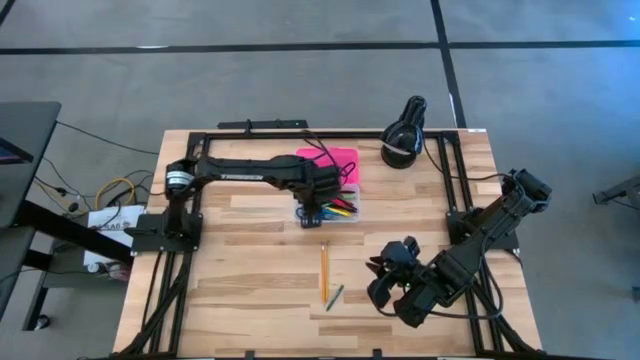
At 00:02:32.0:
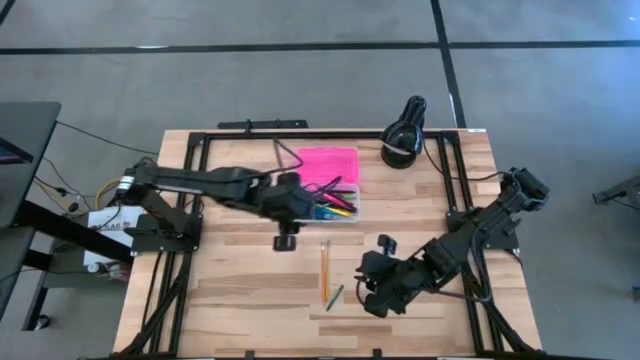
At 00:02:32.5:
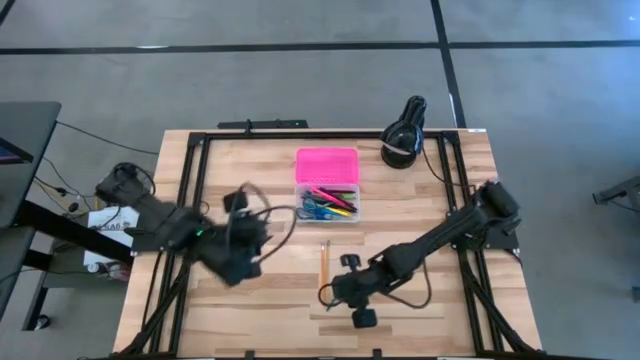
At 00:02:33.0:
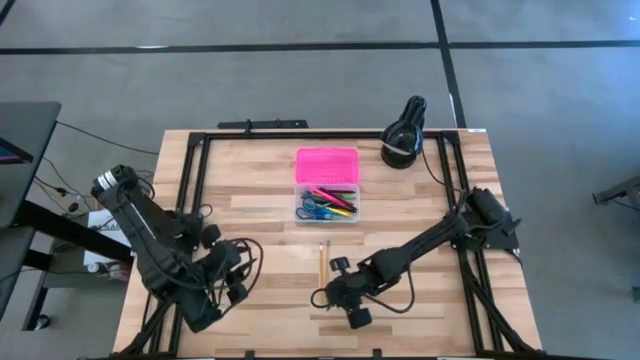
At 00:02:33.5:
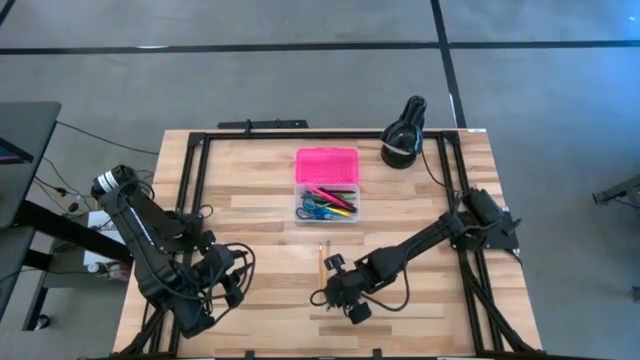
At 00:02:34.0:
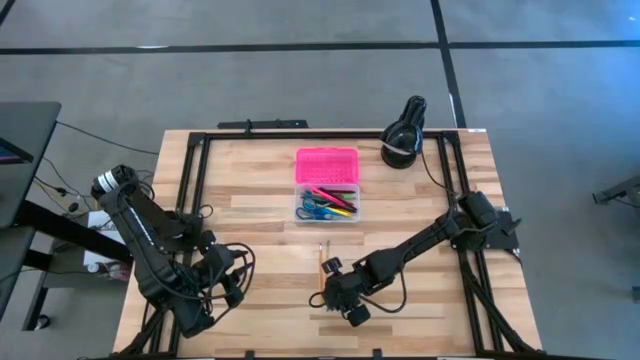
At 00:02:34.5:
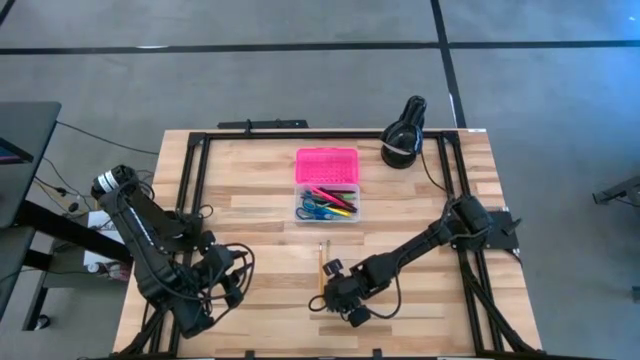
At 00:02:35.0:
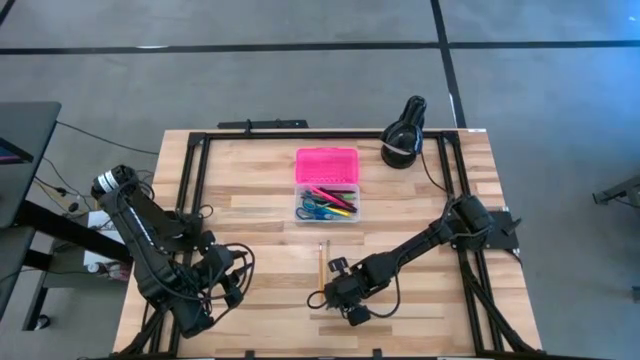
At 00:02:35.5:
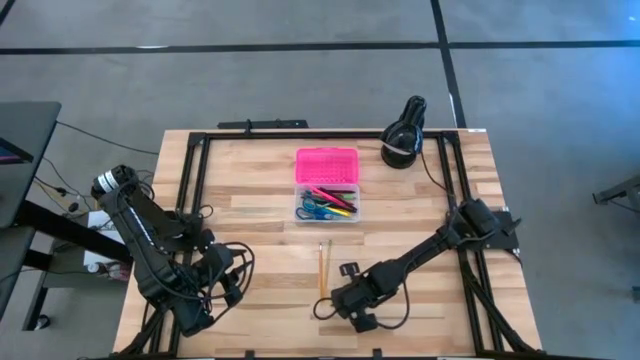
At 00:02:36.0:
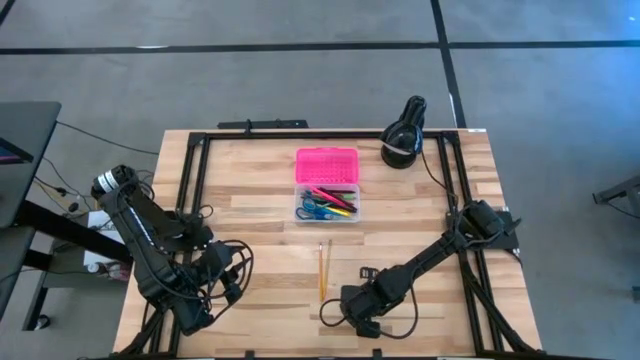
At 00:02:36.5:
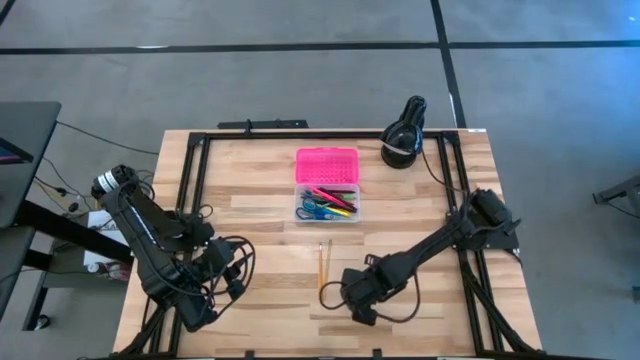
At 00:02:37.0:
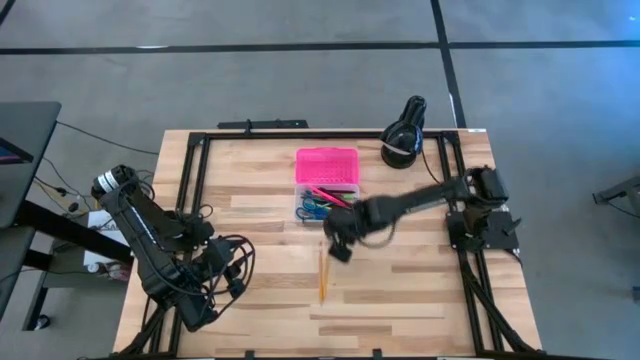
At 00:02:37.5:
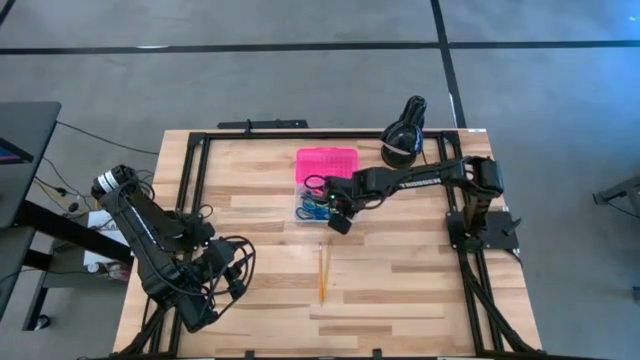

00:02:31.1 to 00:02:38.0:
Task: Pick & place school supplies into a supply box
Put the green crayon into the pink supply box

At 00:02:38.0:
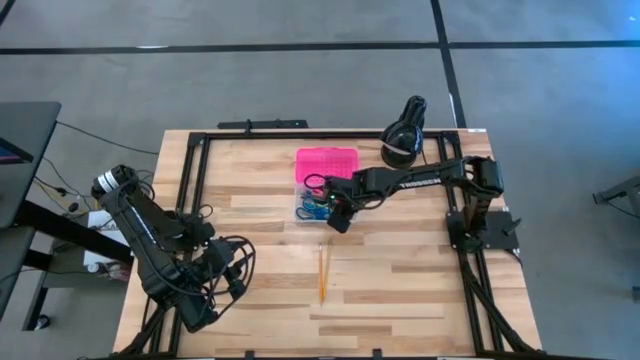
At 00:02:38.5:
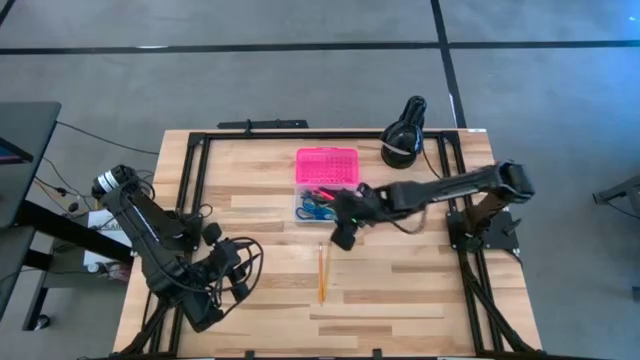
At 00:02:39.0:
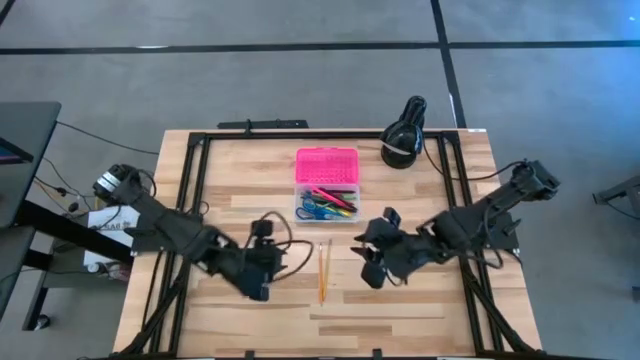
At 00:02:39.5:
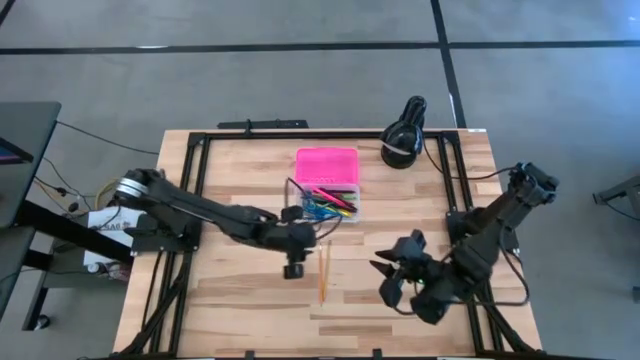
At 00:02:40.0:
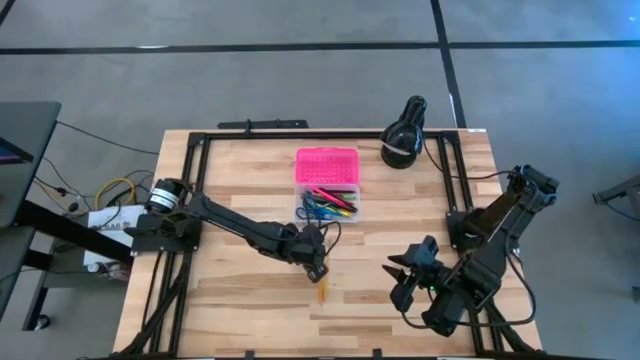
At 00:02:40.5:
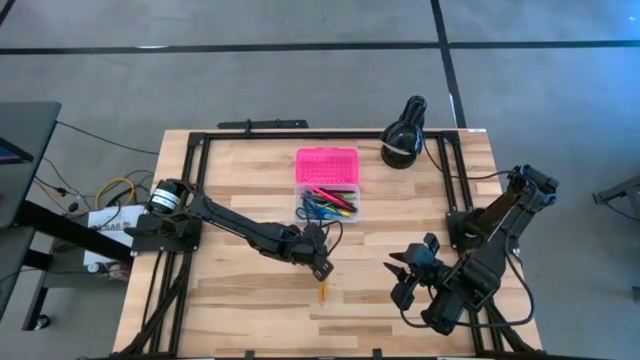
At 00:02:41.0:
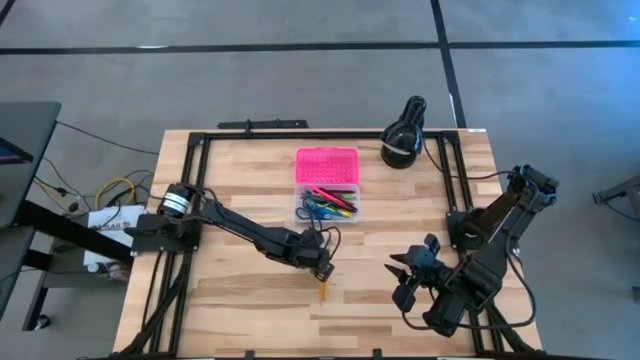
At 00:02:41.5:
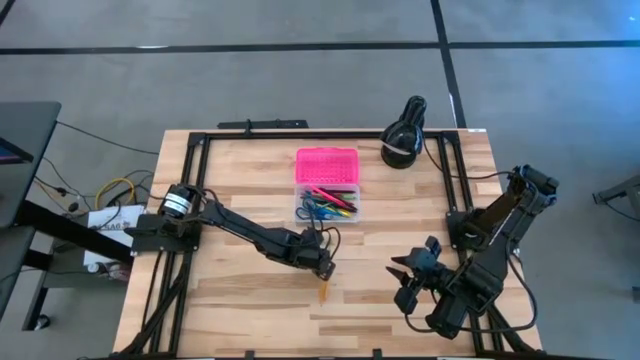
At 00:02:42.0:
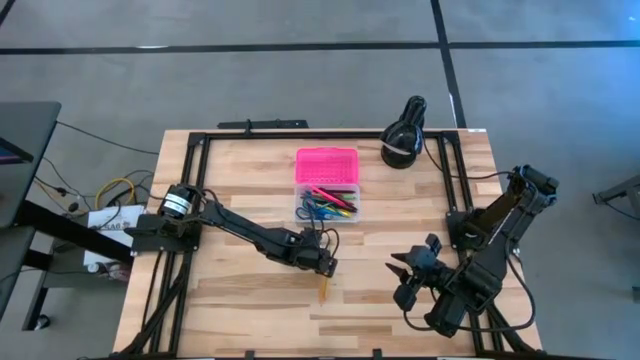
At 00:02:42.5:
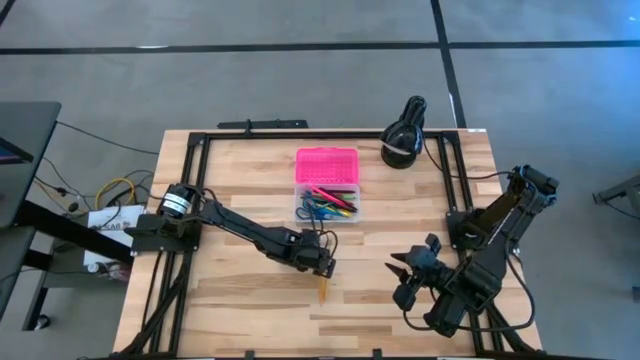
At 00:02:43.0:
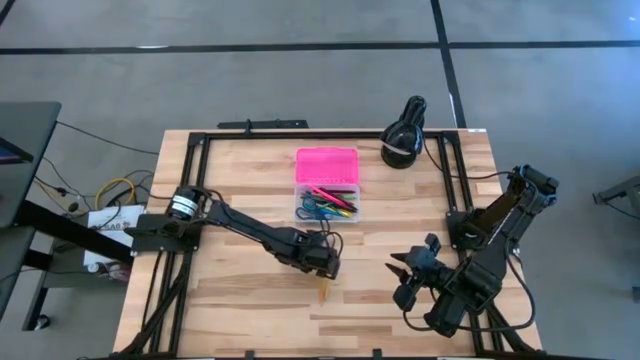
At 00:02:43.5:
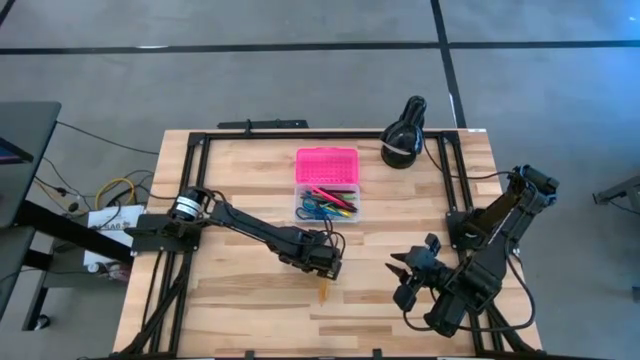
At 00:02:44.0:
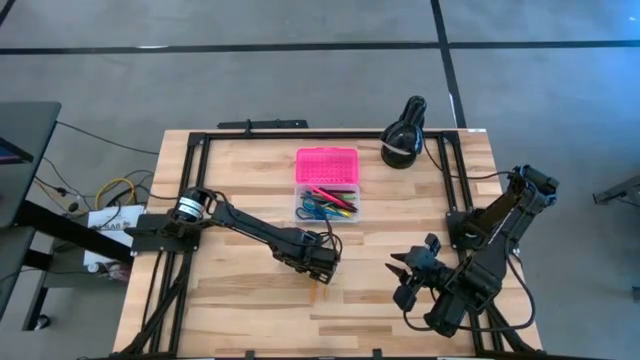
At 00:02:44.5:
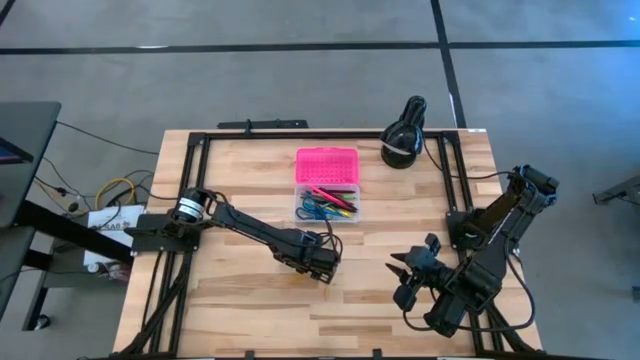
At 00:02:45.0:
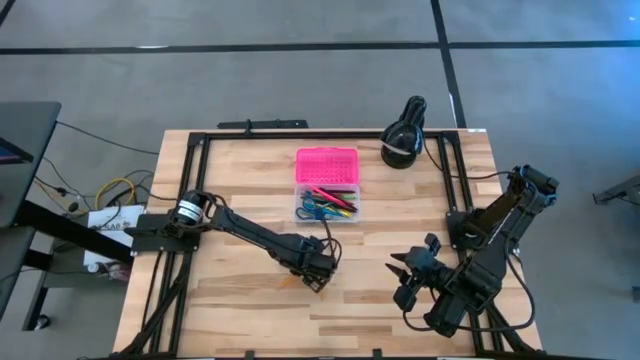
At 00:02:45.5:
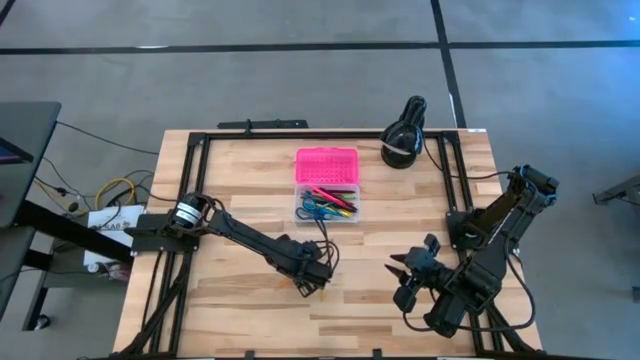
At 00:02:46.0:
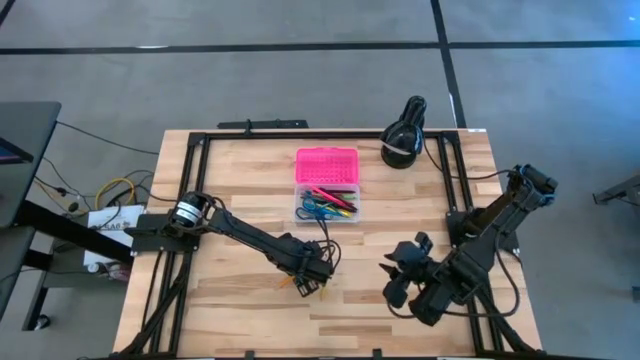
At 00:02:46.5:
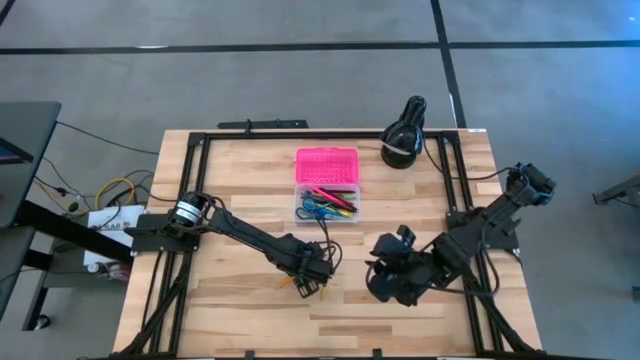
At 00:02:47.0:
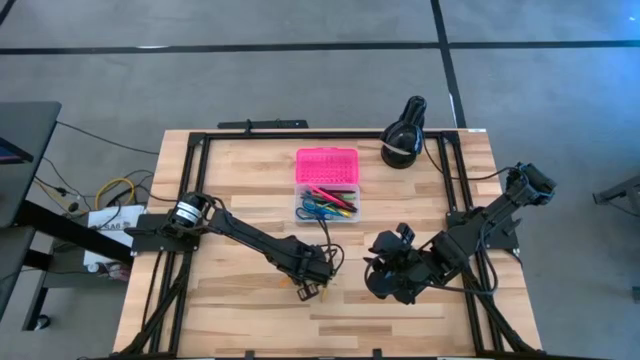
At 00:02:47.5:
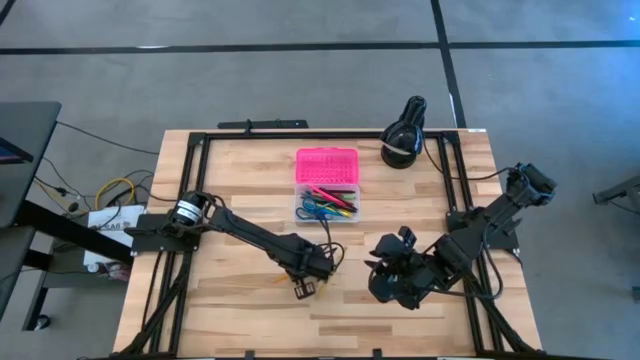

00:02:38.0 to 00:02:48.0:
Put the orange pencil into the pink supply box

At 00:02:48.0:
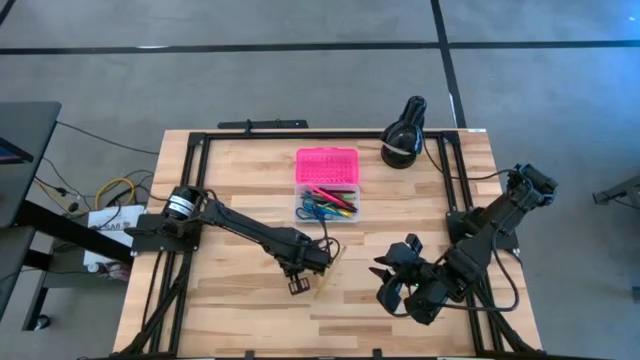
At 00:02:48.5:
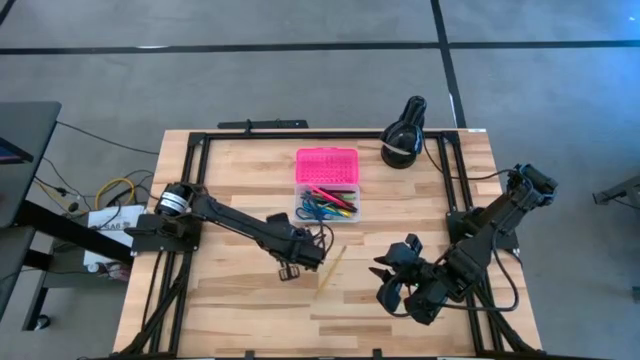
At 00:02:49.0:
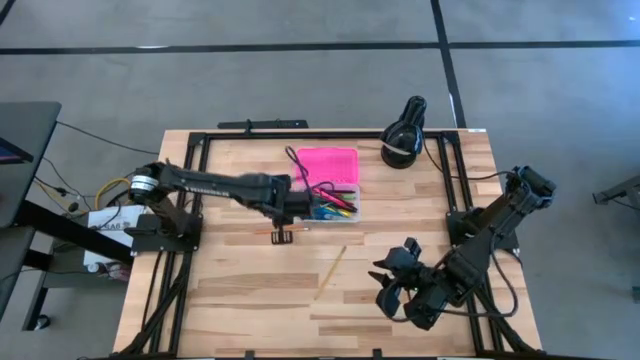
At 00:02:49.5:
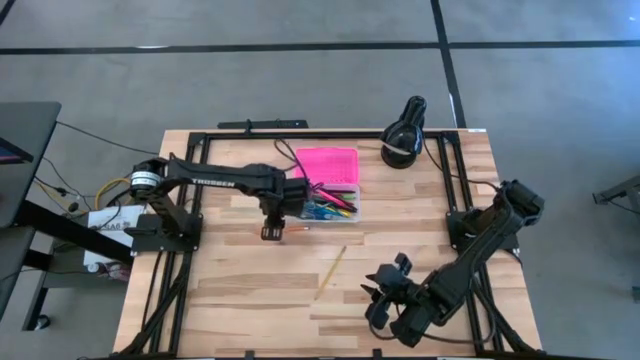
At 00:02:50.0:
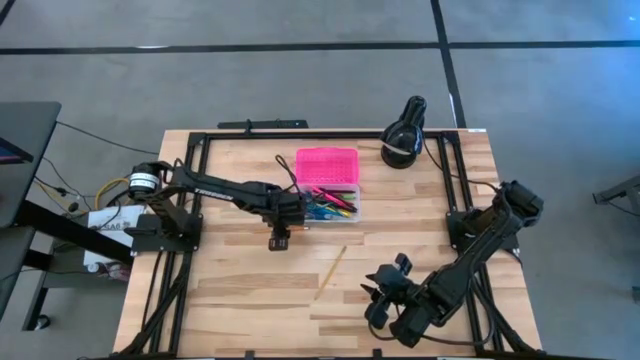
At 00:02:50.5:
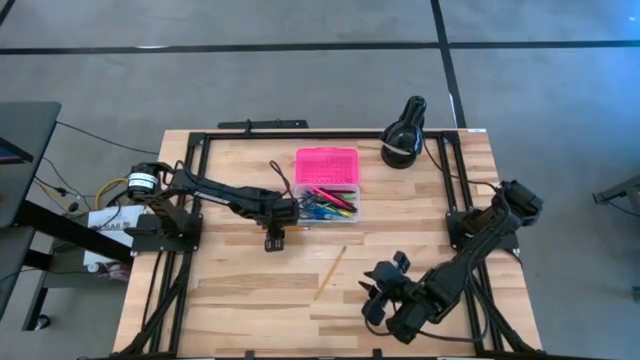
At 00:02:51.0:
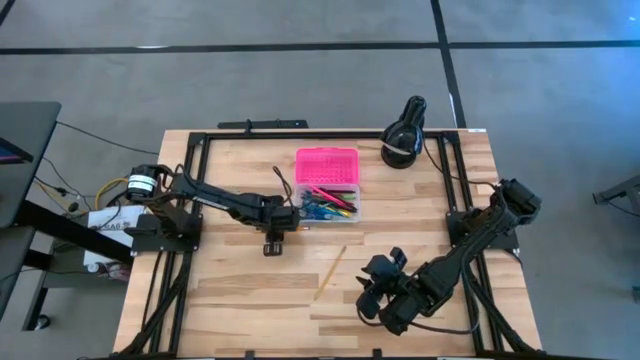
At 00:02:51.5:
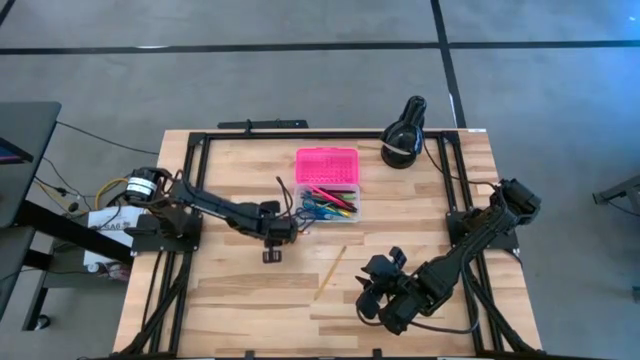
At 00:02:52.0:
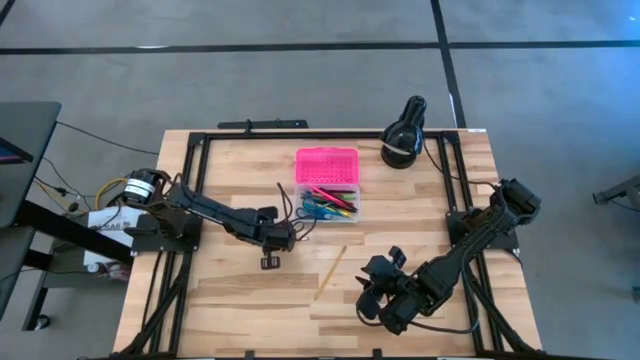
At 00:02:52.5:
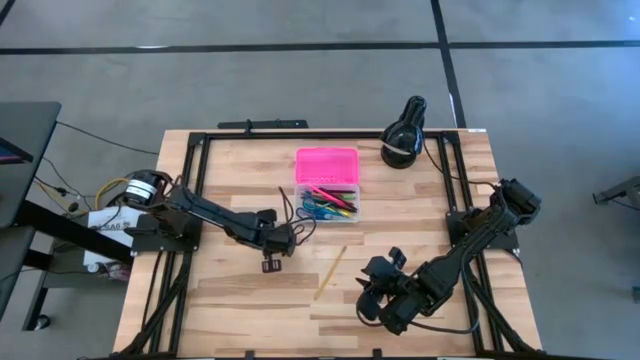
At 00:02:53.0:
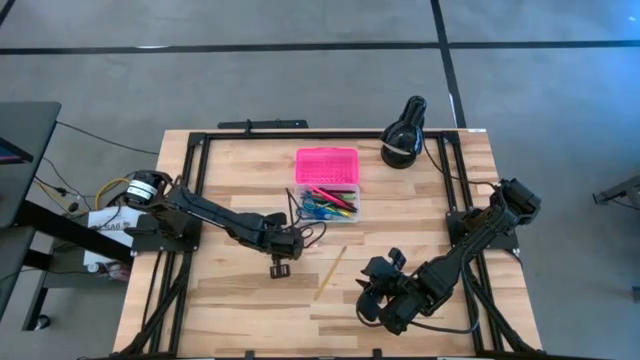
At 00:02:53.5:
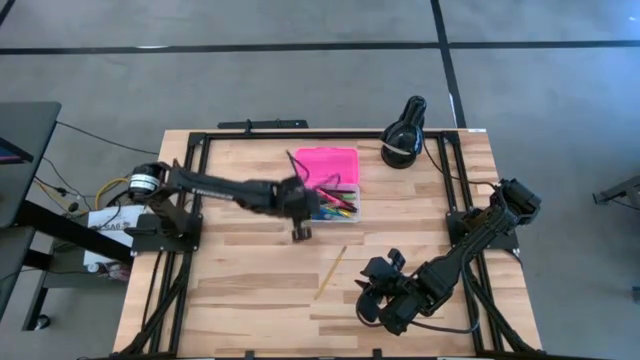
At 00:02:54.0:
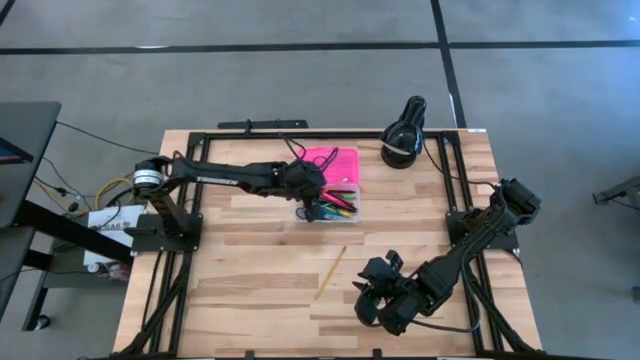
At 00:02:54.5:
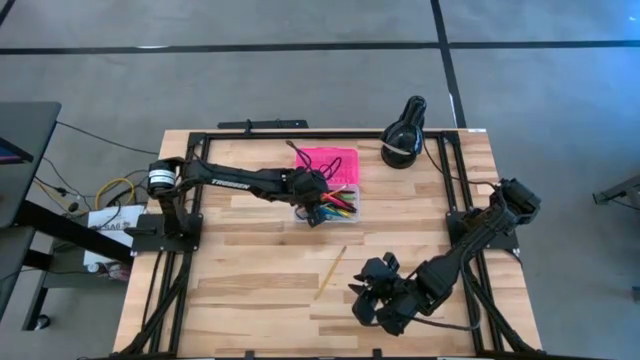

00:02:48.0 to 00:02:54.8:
Put the orange pencil into the pink supply box
